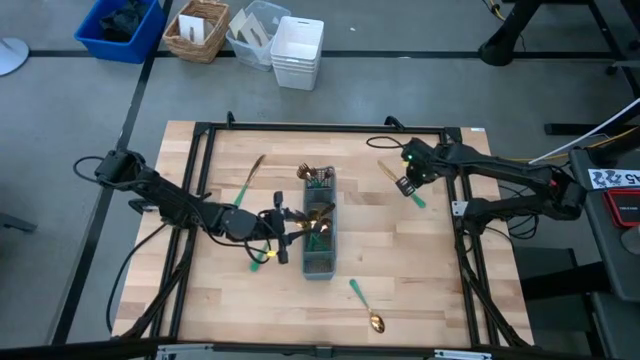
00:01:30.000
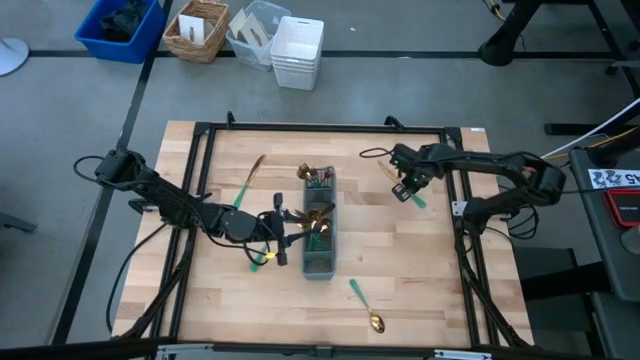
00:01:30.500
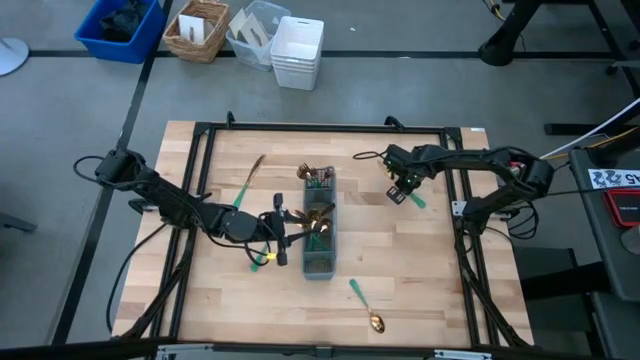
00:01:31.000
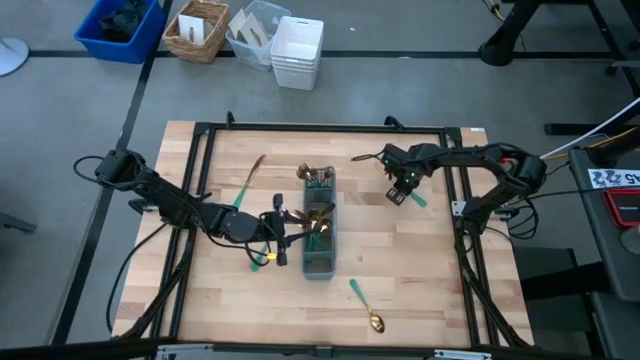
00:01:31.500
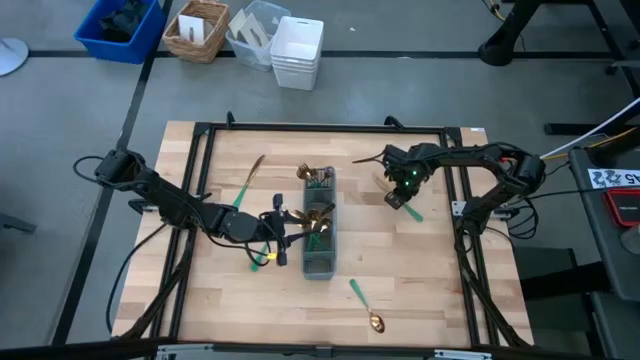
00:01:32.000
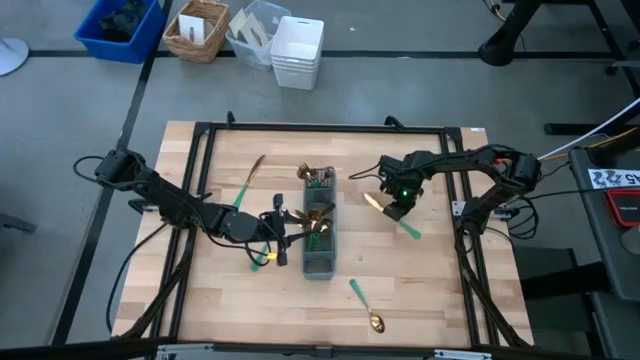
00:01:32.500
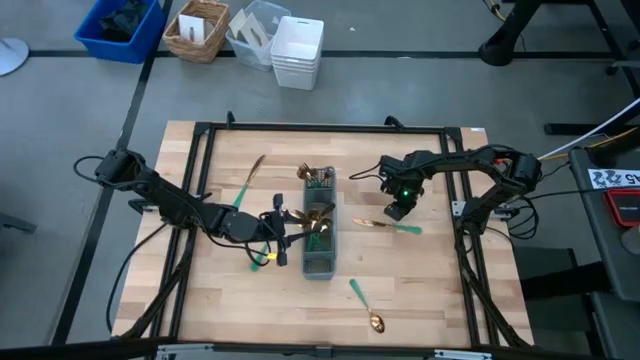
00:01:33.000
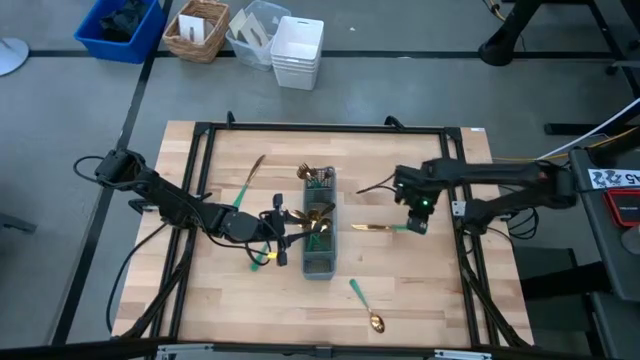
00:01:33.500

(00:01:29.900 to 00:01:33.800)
Task: Sort silverware
Put the green knife into the utensil rack

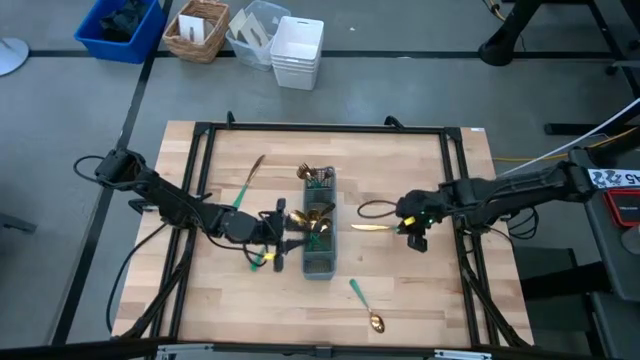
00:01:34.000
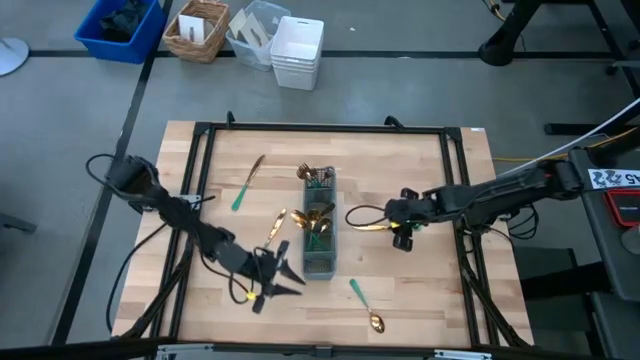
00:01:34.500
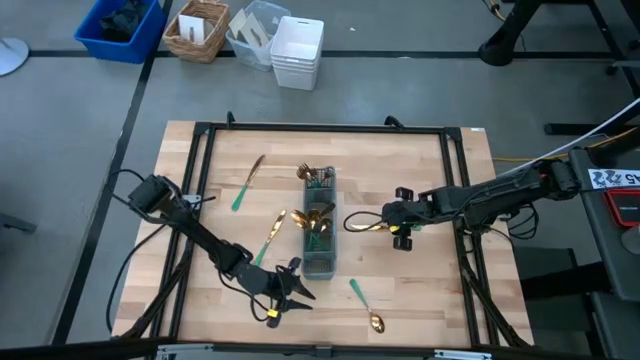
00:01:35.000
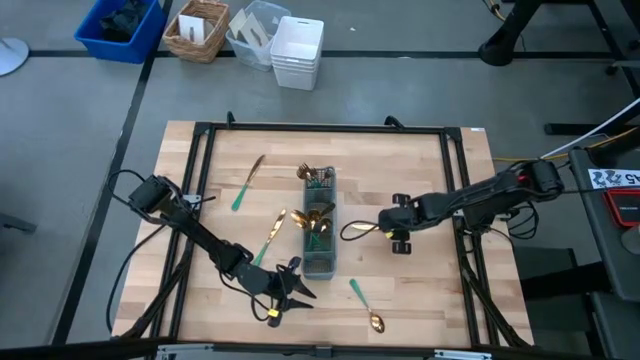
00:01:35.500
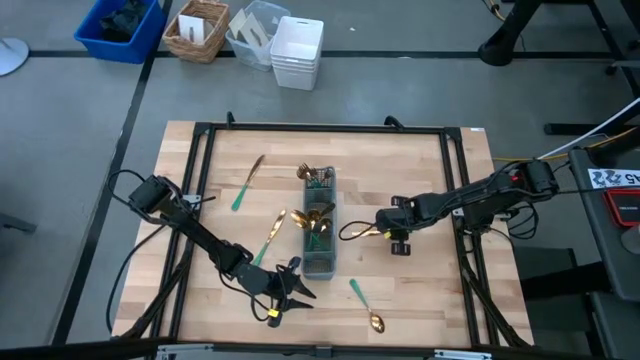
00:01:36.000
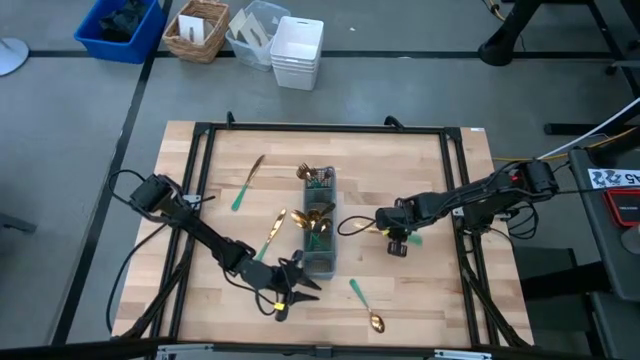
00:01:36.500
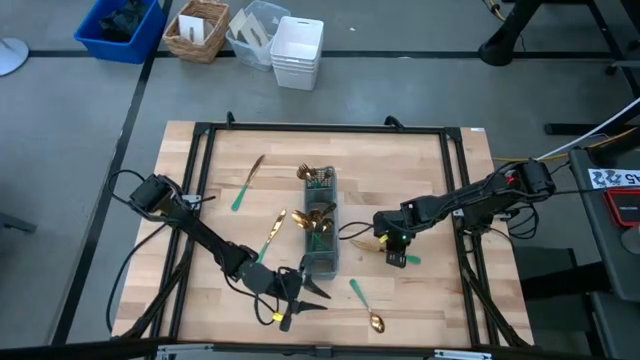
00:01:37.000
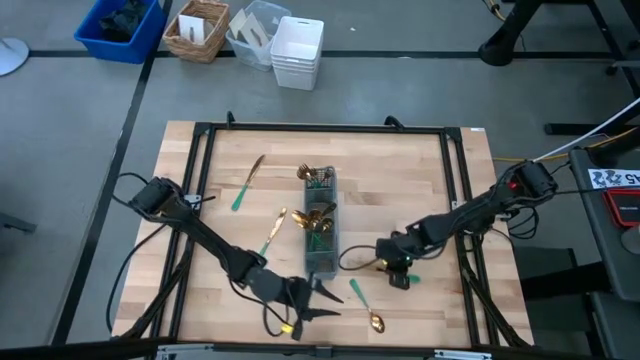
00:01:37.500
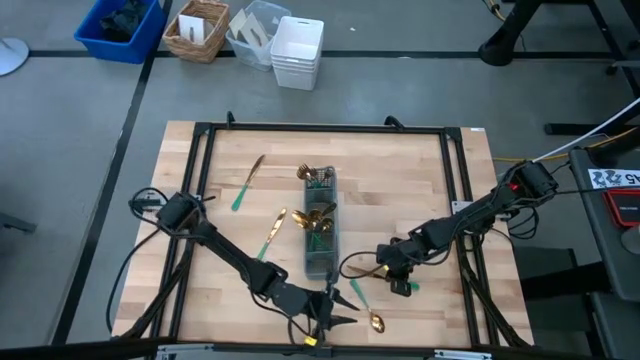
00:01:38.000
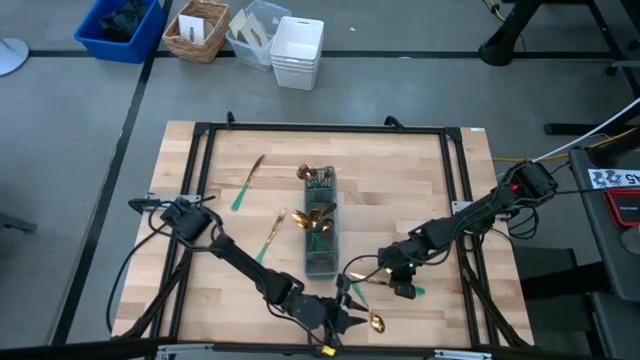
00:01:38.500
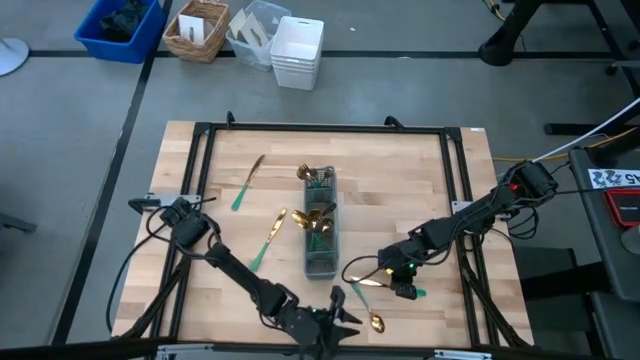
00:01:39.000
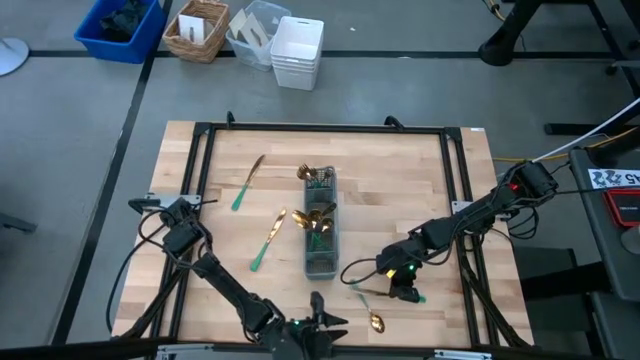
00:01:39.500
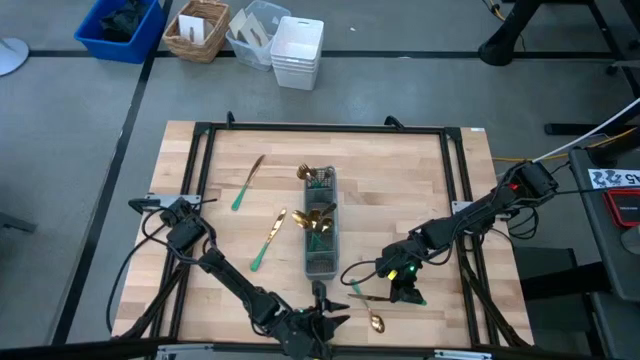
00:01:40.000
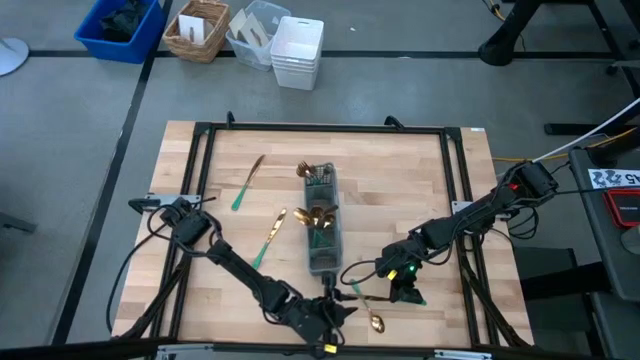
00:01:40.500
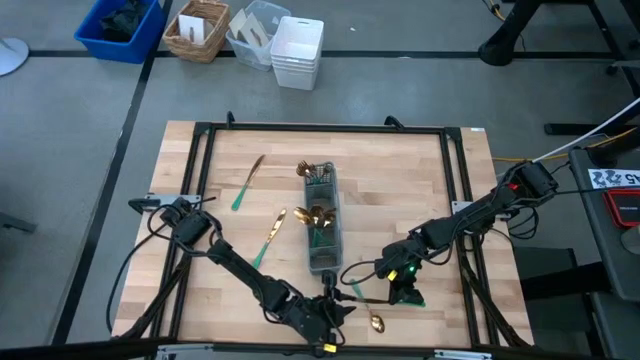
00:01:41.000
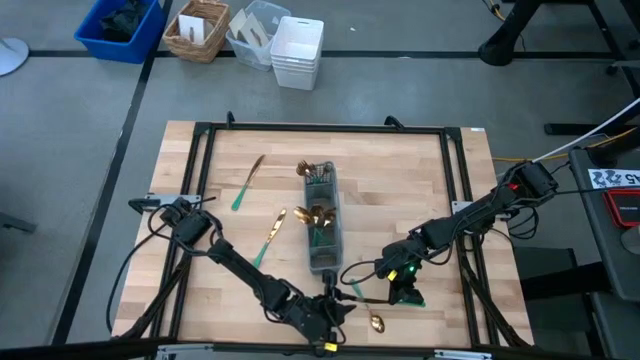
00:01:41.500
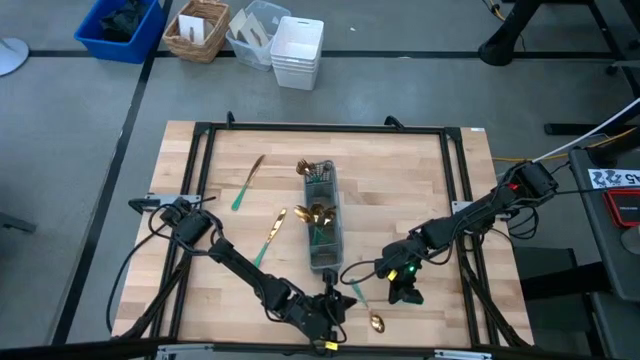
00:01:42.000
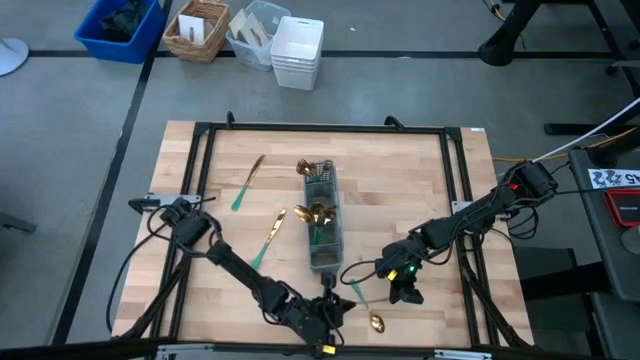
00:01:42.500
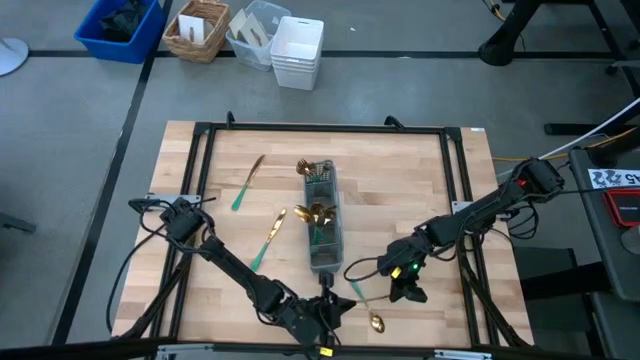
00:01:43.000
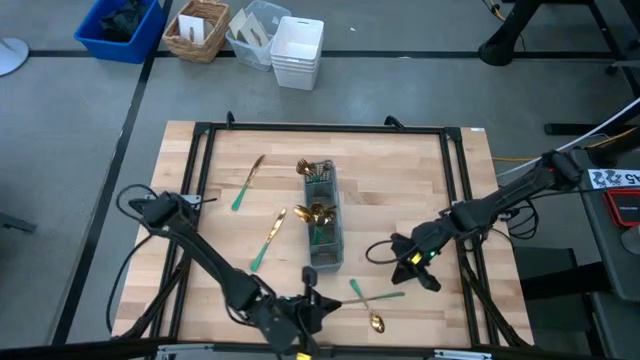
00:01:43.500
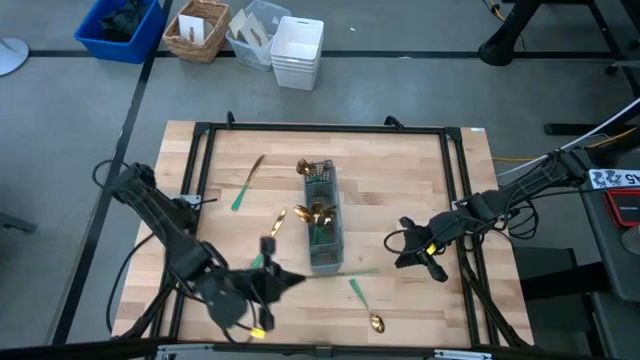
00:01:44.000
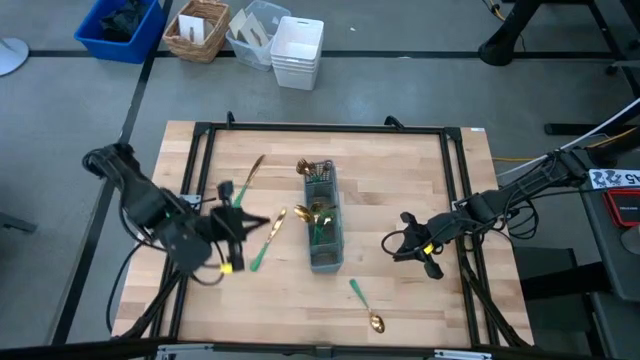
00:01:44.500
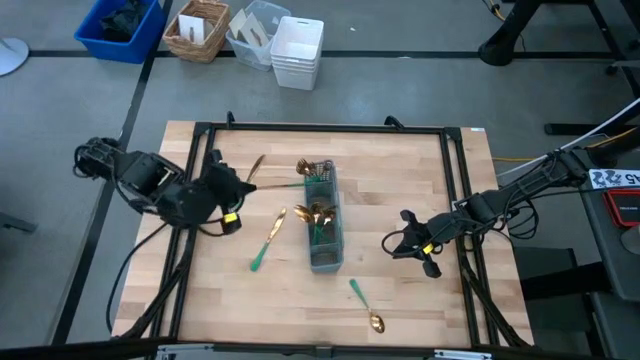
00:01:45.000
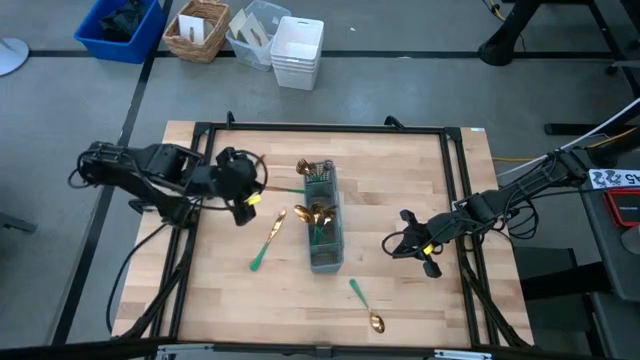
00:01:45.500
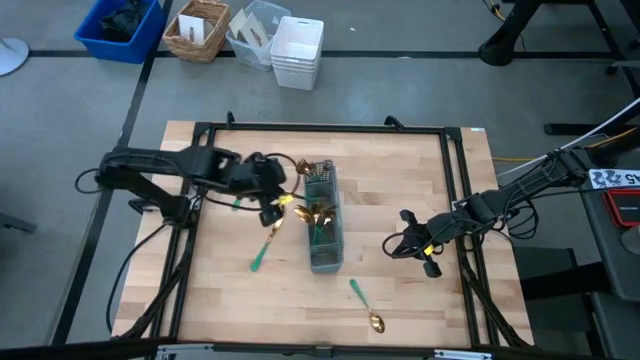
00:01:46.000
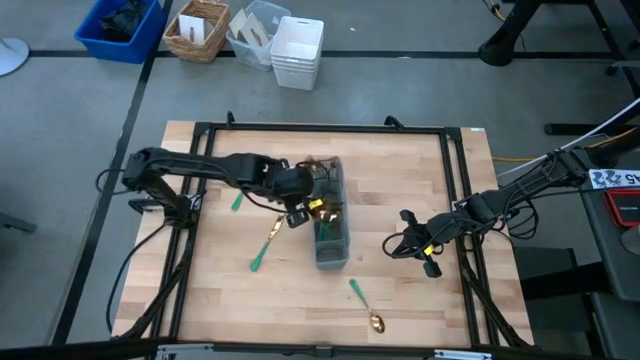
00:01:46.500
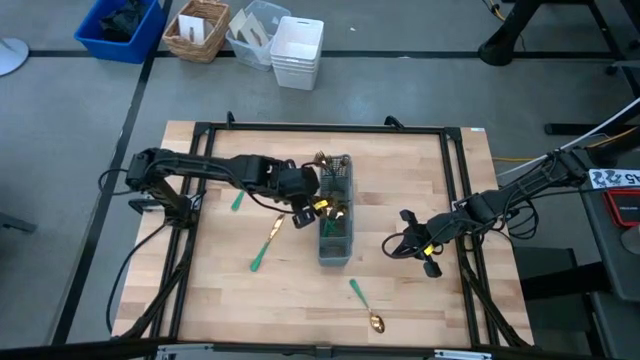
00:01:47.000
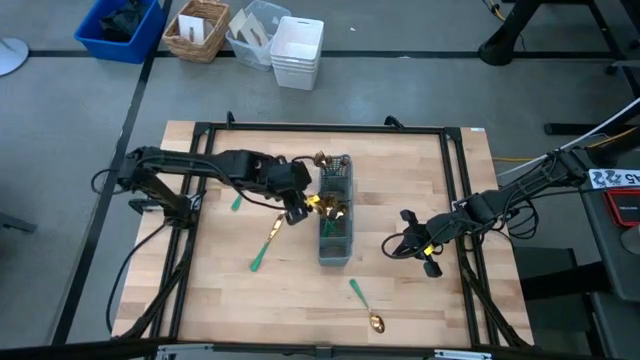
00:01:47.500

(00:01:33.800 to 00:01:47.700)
Put the green knife into the utensil rack

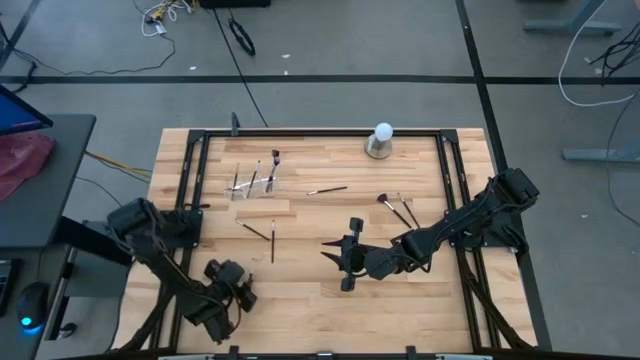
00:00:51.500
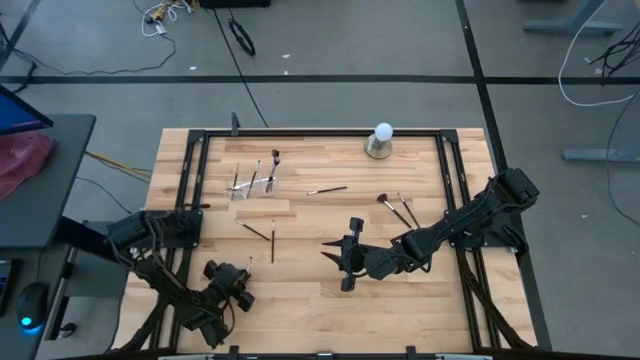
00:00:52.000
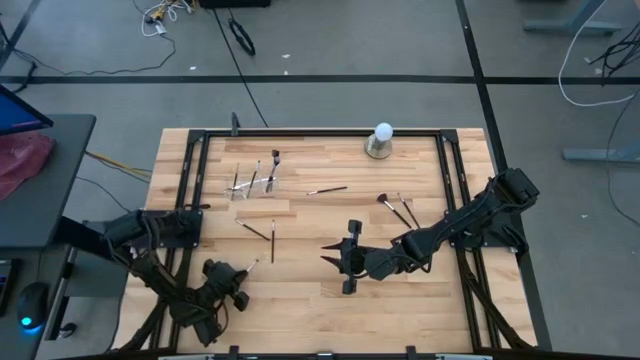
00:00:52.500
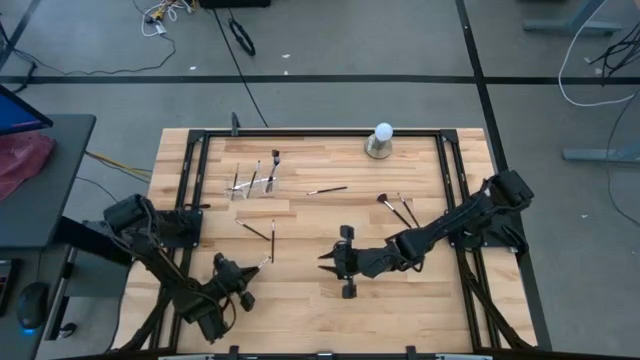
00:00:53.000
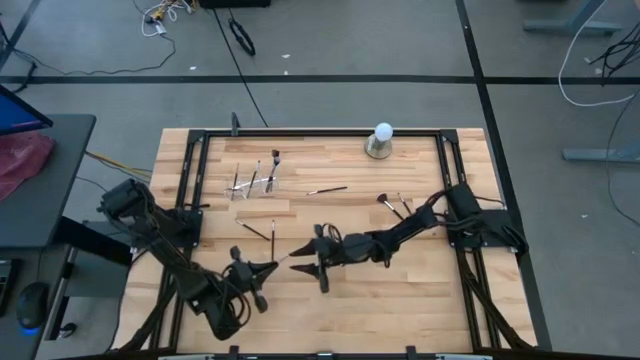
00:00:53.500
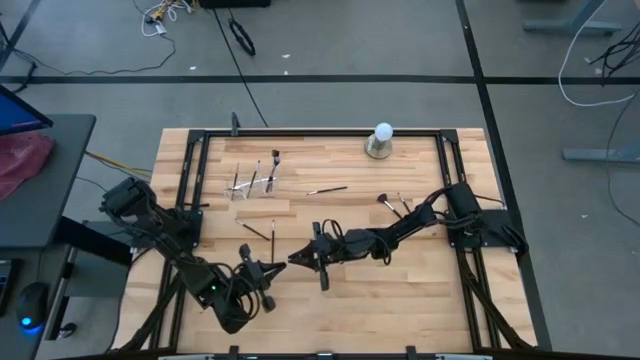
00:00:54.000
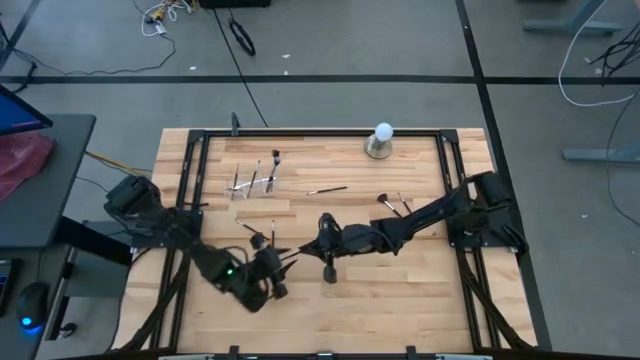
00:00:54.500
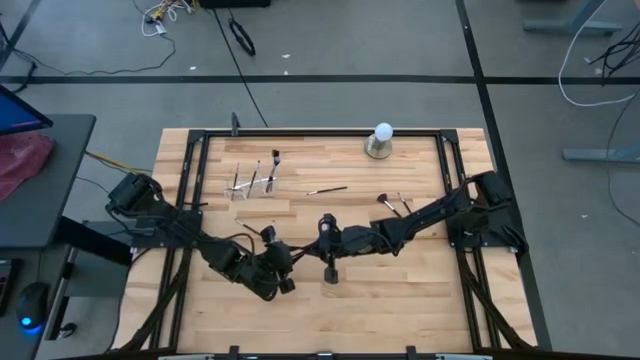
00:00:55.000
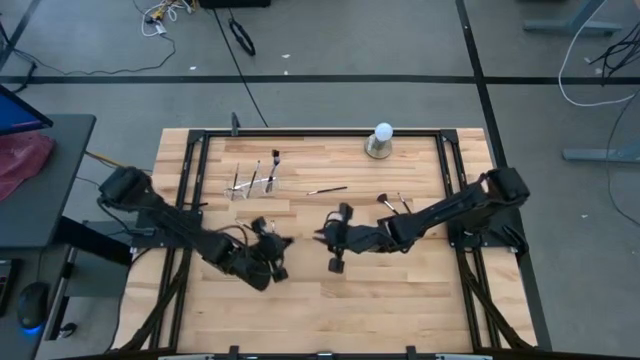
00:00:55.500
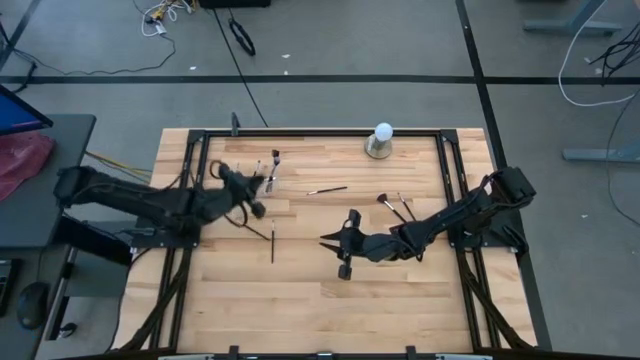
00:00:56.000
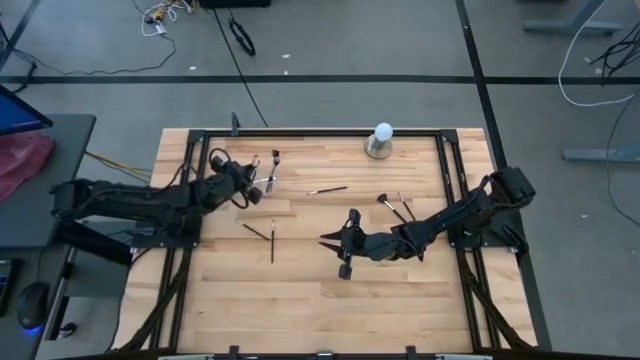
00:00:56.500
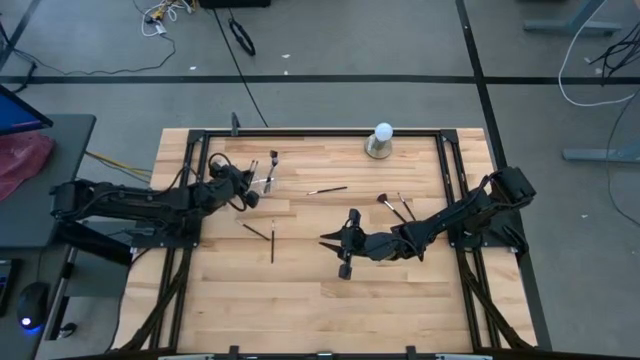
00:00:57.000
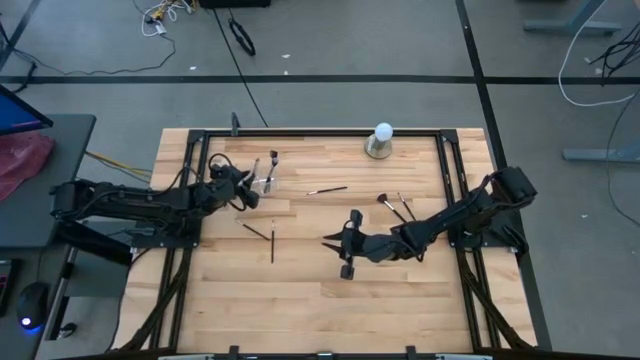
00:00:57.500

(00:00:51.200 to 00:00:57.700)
Task: Put items in baskets/containers
Put the black eyeshadow brush into the middle section of the transparent organizer
